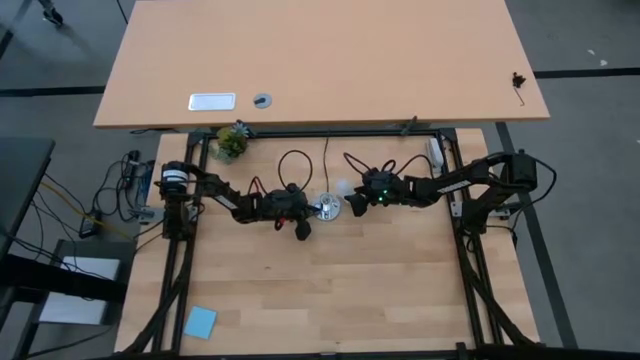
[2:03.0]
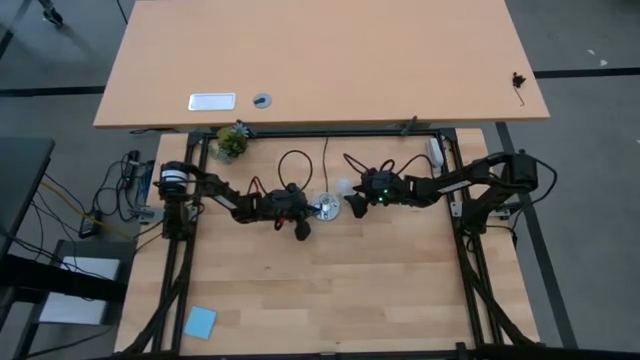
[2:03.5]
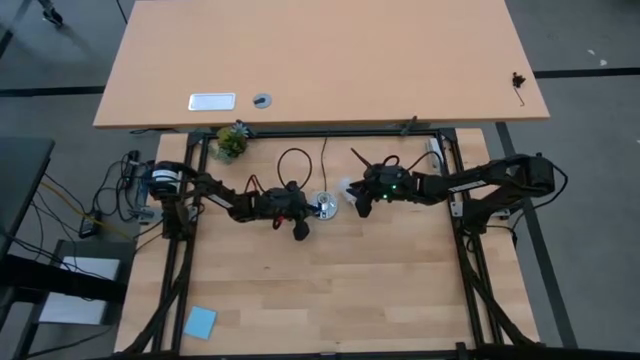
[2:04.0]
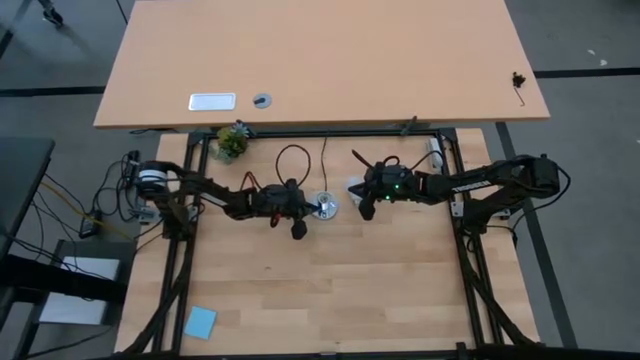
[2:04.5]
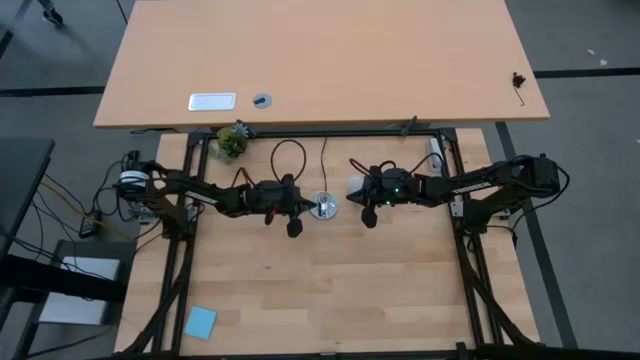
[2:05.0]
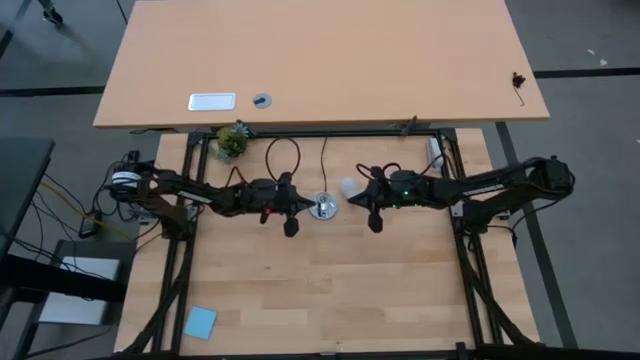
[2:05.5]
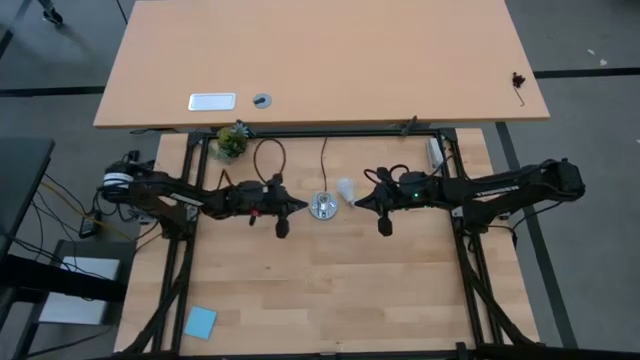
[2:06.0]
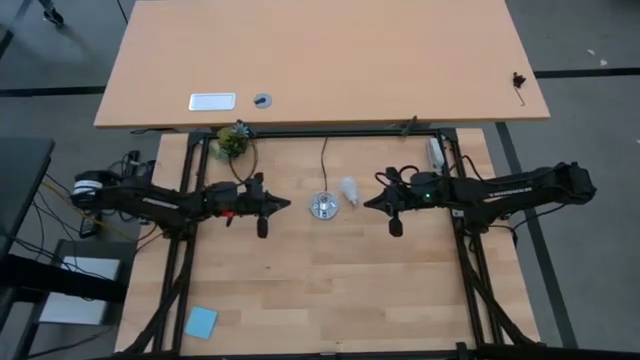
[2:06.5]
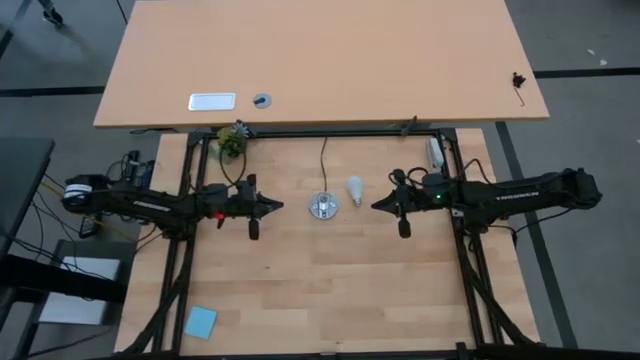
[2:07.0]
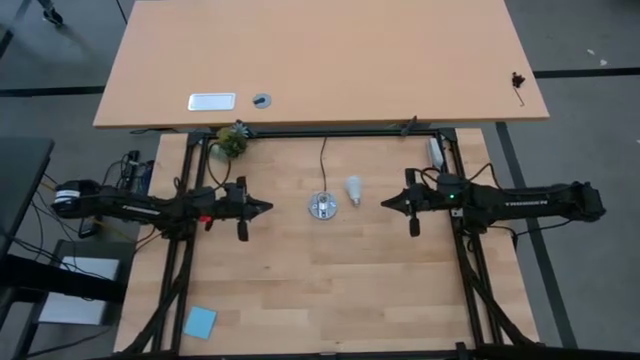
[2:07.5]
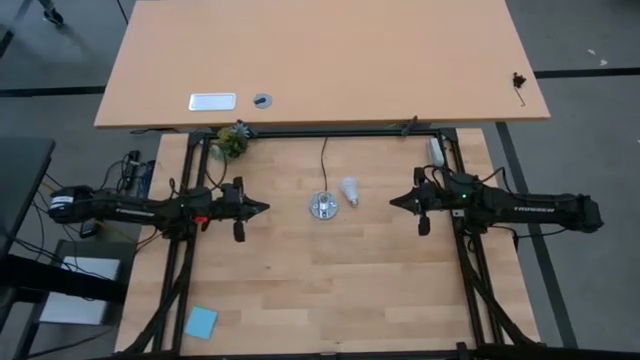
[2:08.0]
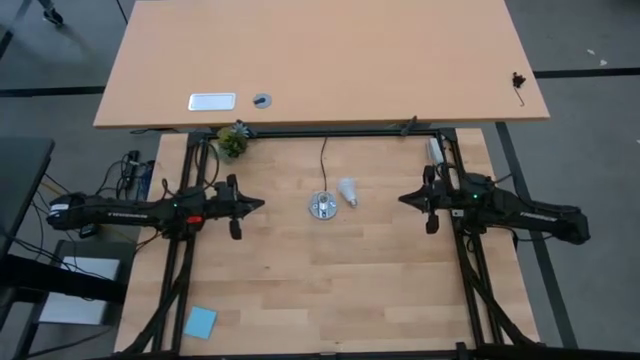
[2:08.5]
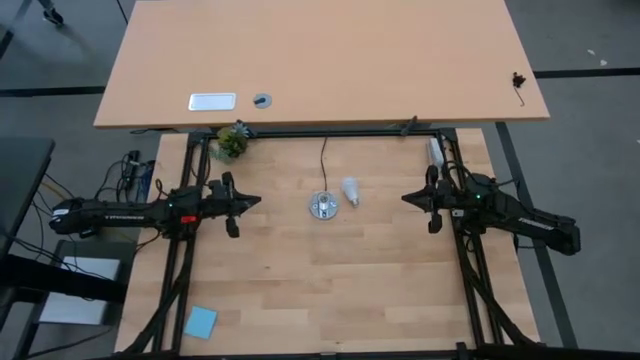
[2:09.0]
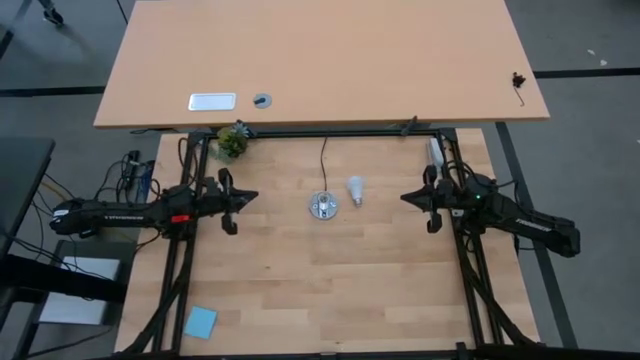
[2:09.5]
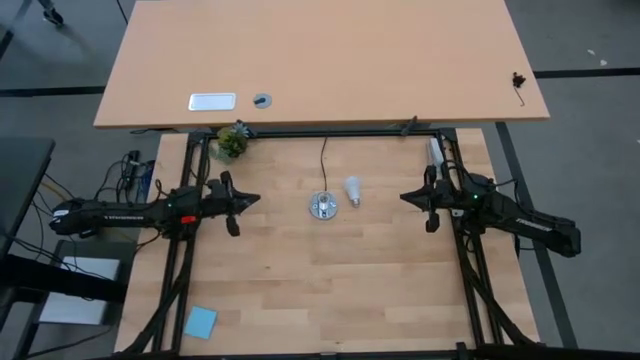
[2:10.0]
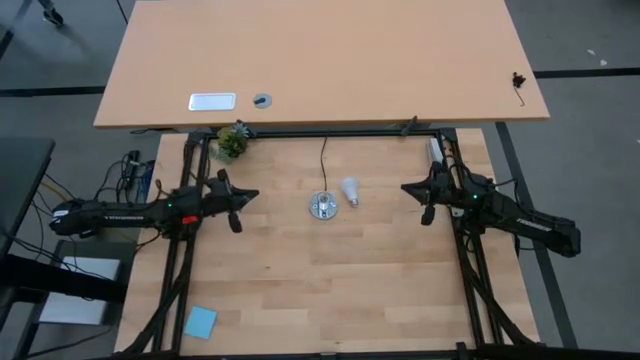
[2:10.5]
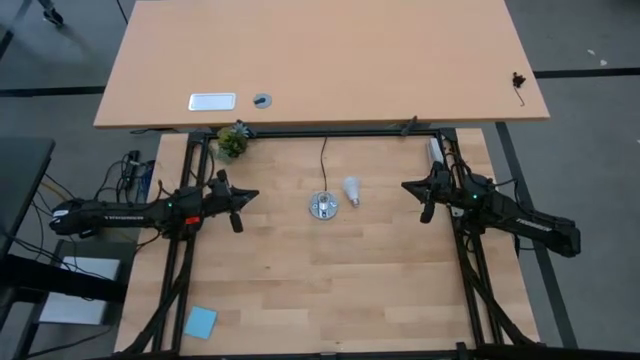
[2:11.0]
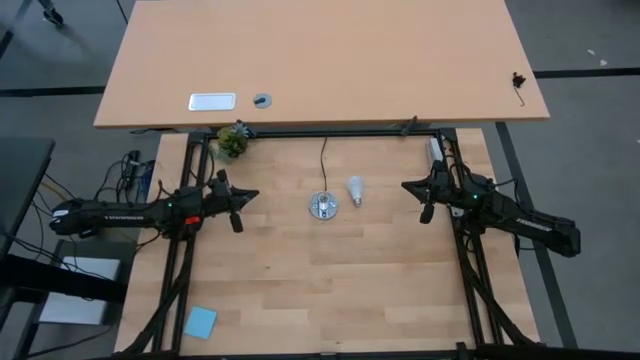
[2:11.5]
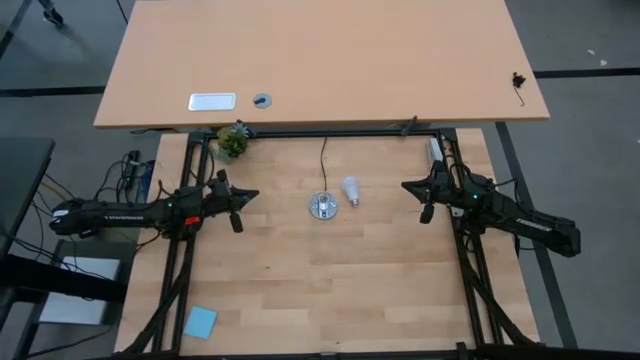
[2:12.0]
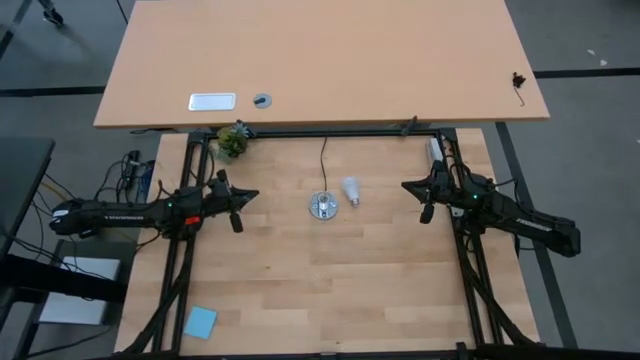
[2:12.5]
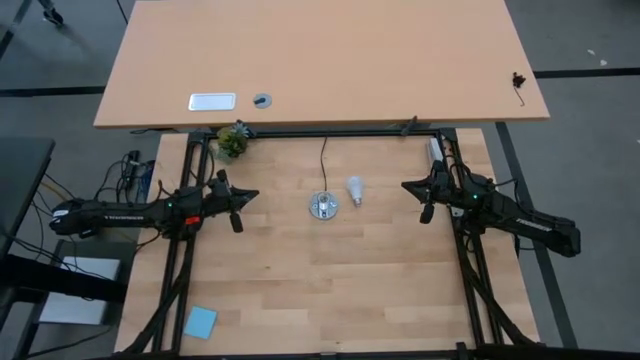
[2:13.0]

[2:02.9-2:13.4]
Task: Screw lightbulb
Return to Home Position

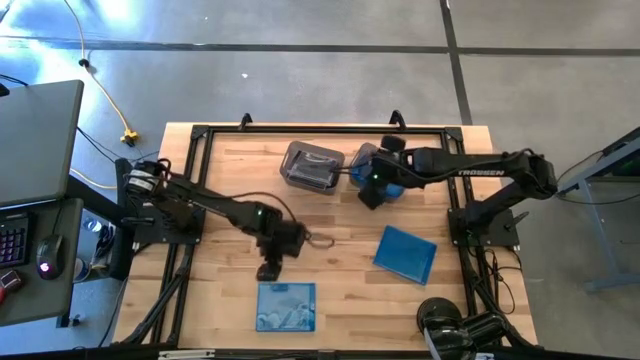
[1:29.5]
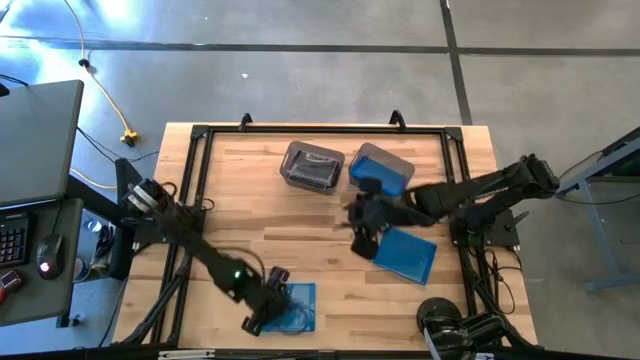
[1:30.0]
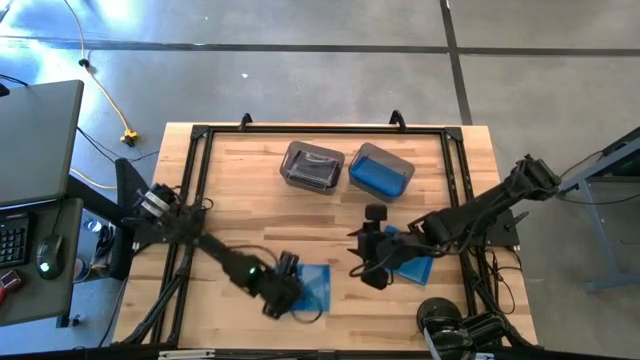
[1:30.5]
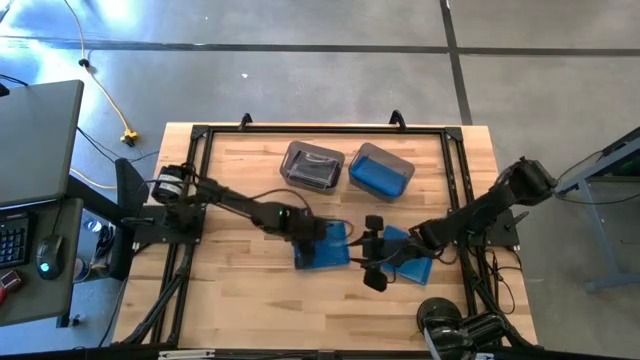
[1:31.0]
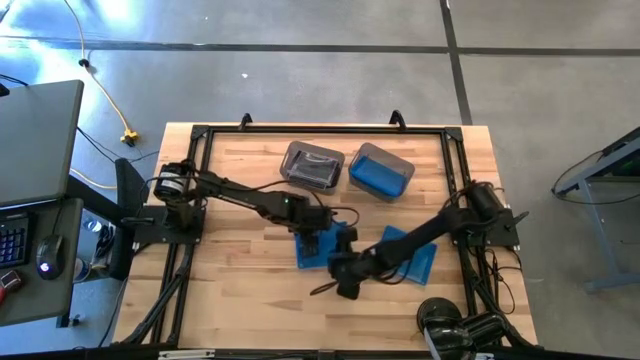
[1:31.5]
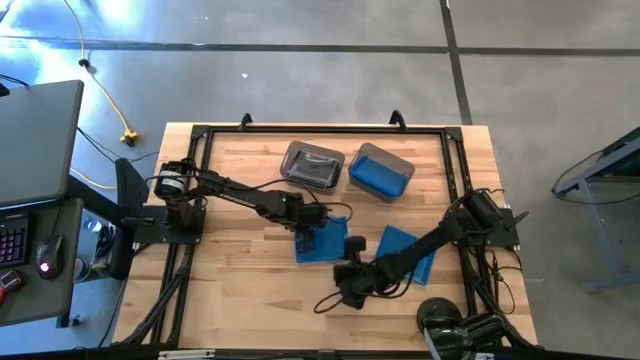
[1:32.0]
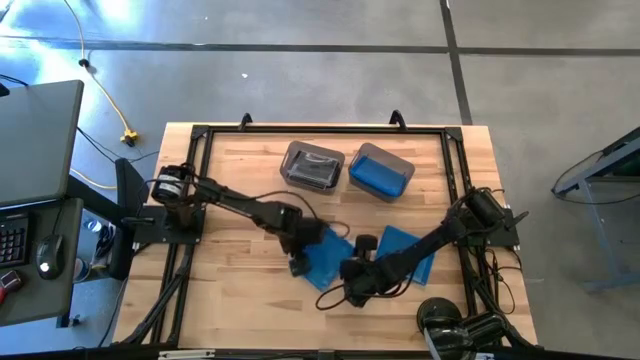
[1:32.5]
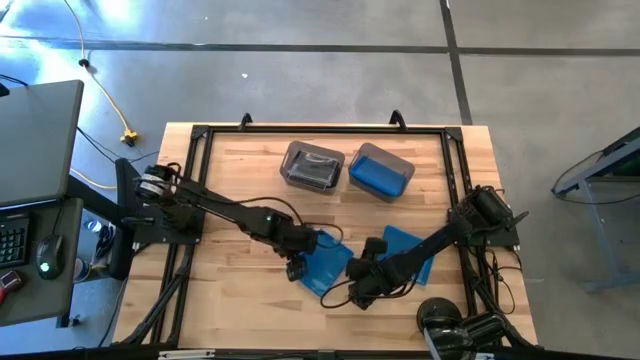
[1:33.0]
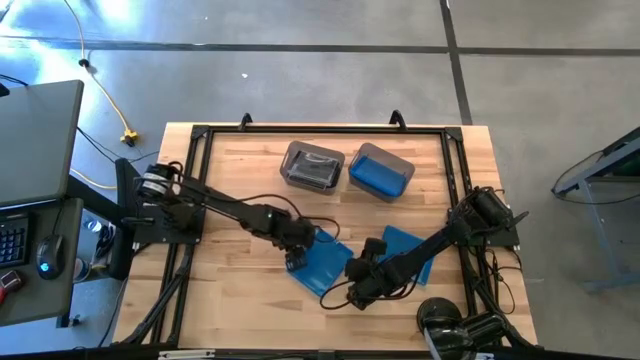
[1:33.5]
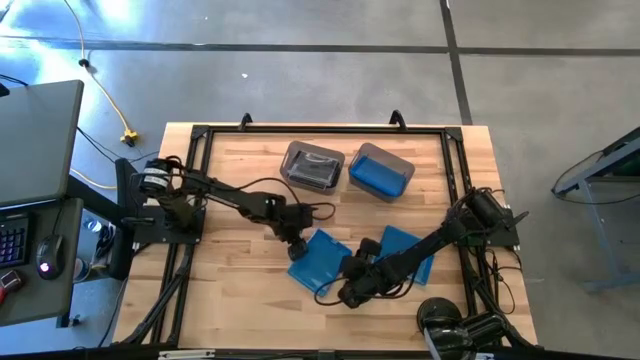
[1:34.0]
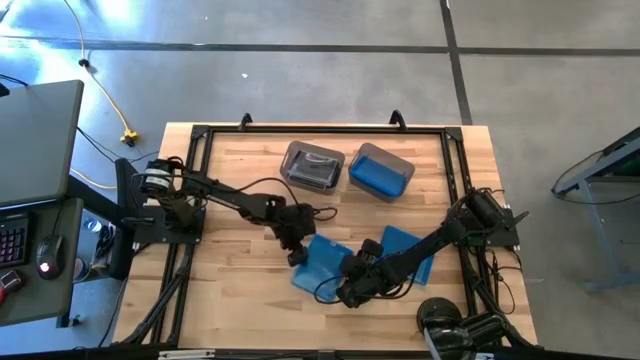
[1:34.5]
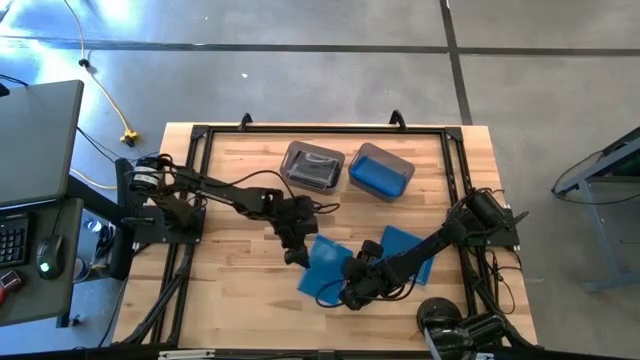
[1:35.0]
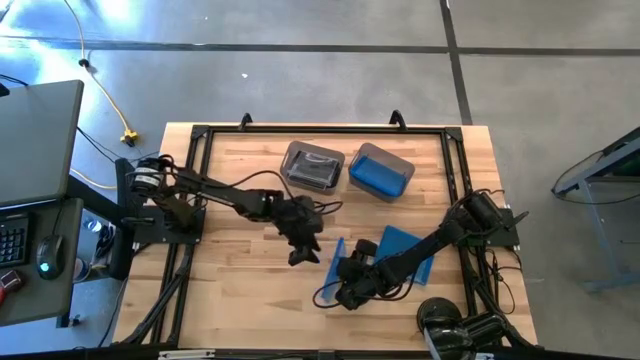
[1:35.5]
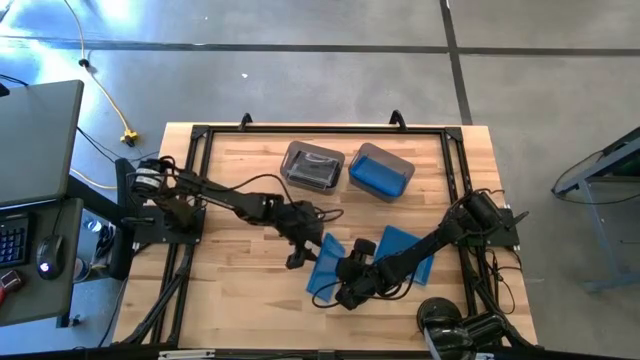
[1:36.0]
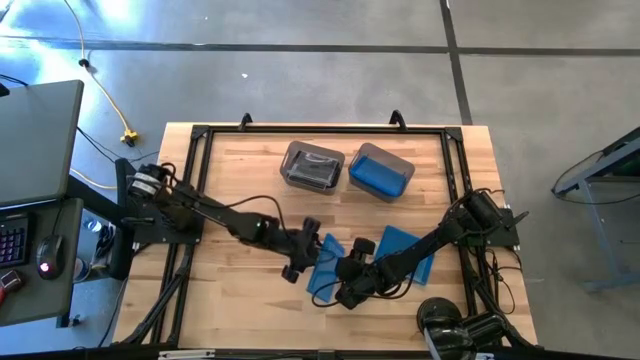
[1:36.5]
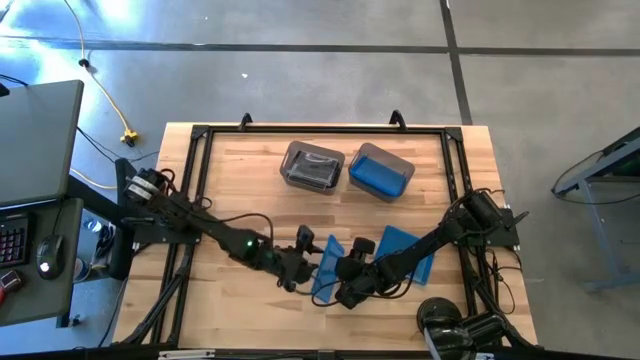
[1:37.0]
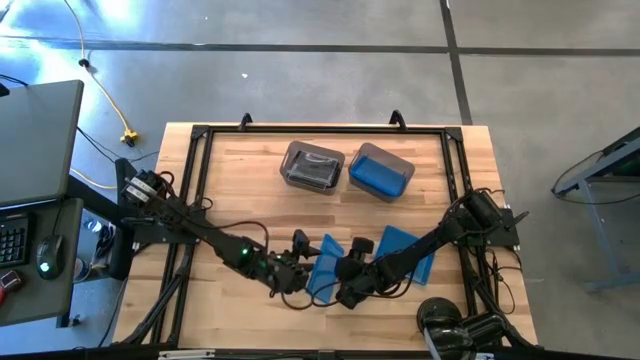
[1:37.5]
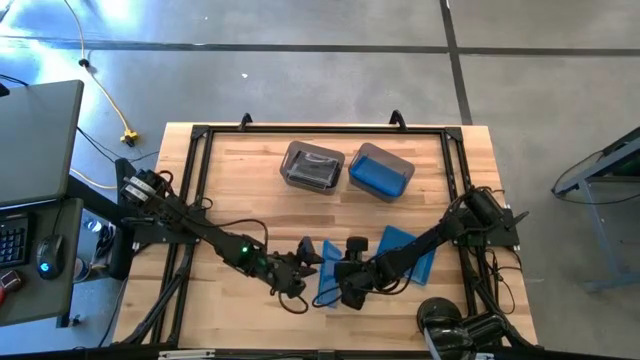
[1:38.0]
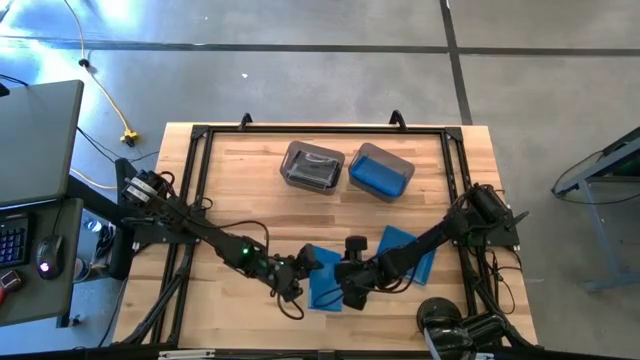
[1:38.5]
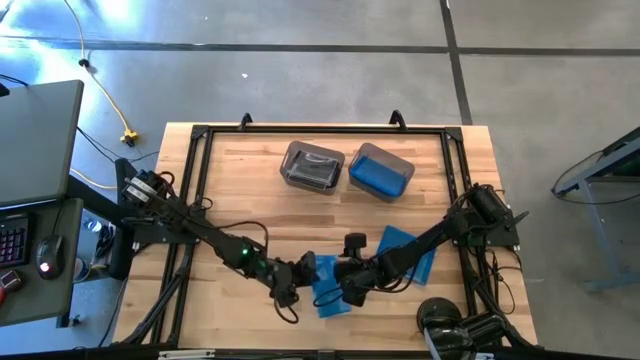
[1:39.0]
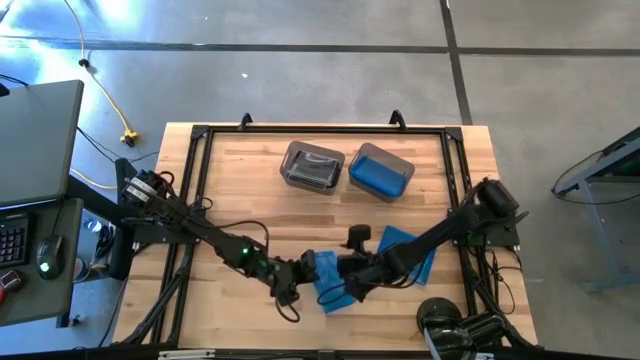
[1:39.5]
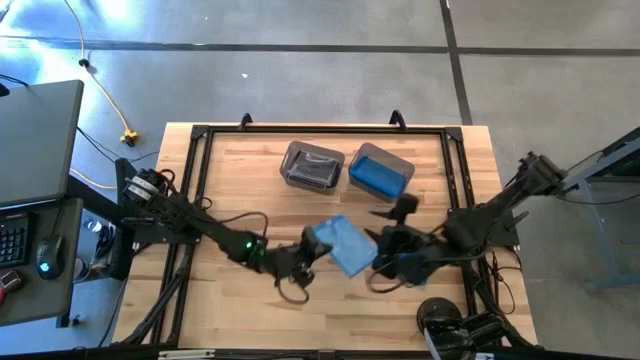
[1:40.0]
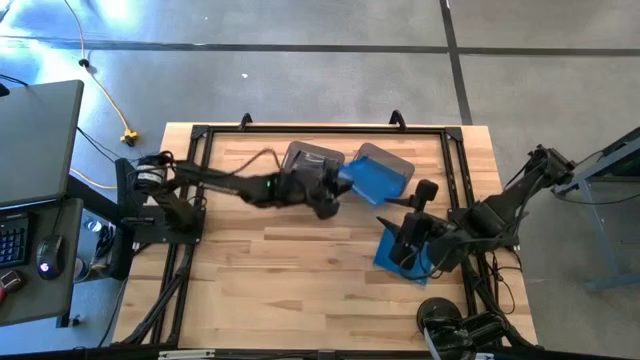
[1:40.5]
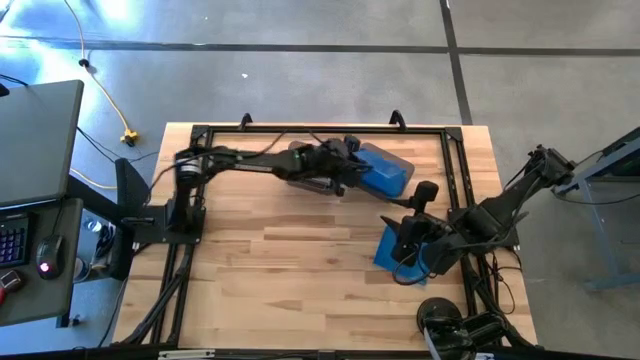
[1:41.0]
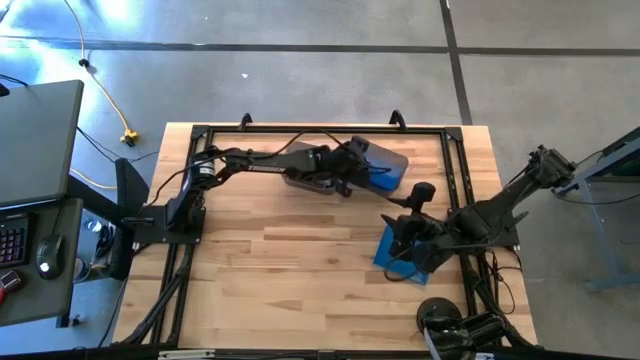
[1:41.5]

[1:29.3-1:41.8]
Task: Pick & place jewel cases by type
Put the bottom blue CD case into the right black bin
